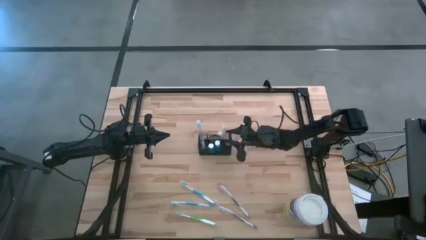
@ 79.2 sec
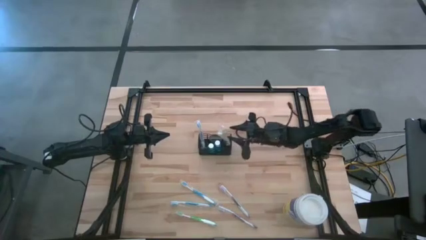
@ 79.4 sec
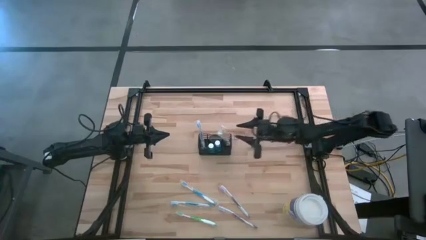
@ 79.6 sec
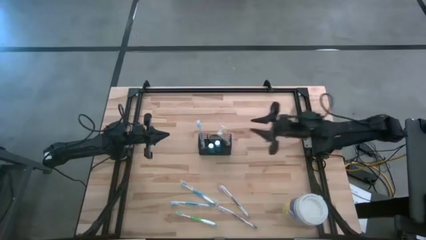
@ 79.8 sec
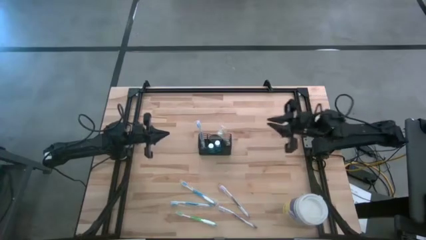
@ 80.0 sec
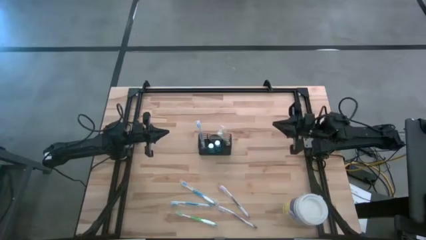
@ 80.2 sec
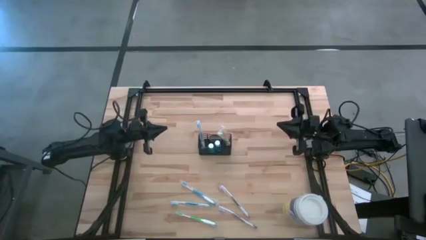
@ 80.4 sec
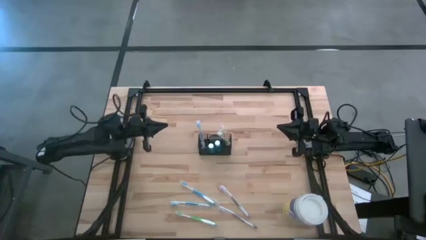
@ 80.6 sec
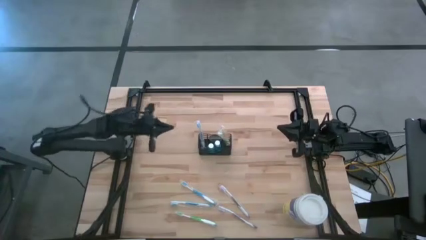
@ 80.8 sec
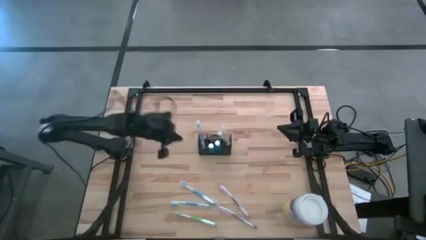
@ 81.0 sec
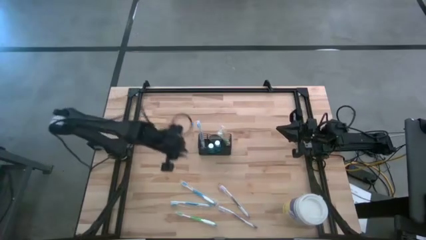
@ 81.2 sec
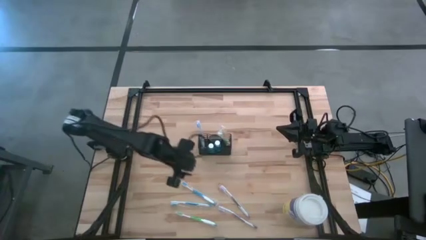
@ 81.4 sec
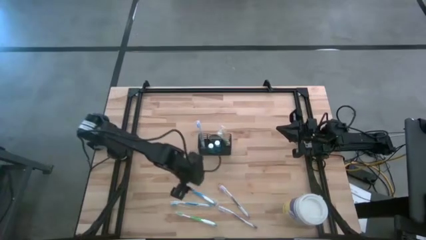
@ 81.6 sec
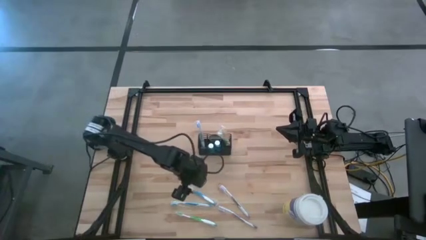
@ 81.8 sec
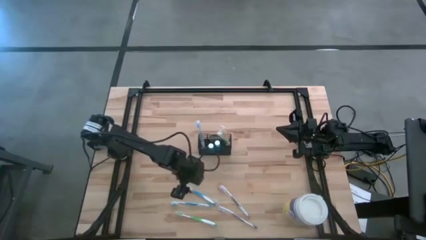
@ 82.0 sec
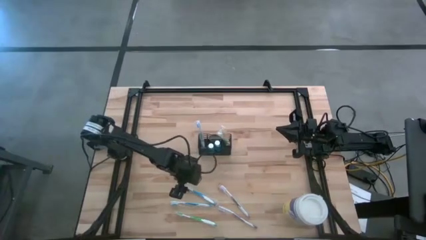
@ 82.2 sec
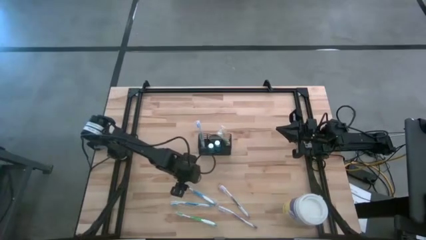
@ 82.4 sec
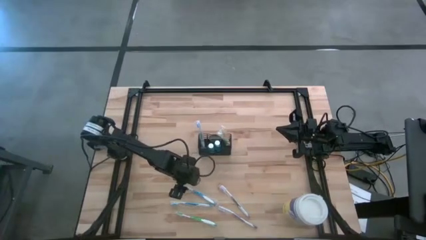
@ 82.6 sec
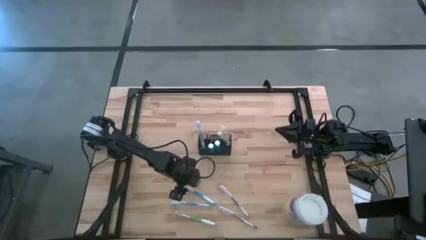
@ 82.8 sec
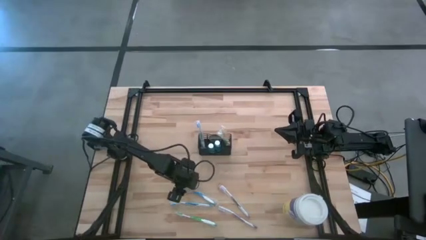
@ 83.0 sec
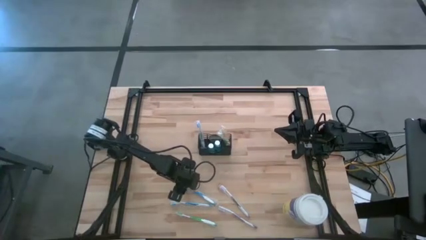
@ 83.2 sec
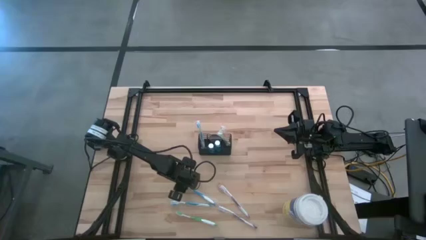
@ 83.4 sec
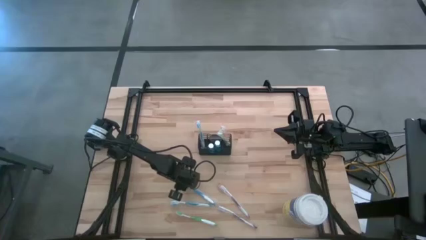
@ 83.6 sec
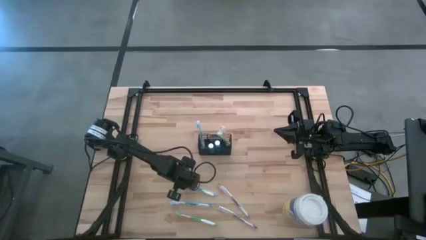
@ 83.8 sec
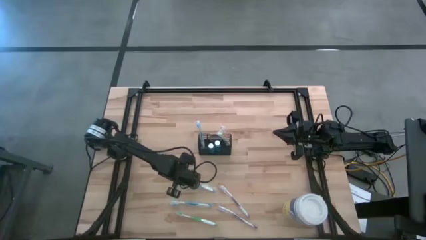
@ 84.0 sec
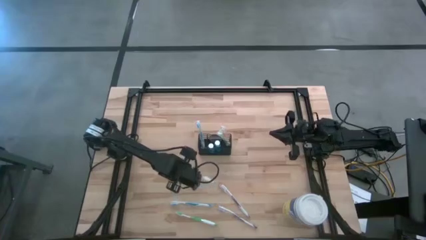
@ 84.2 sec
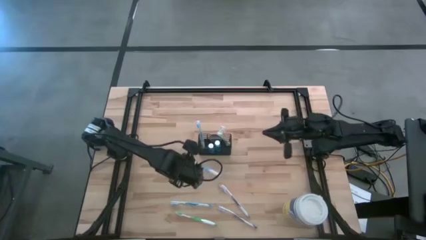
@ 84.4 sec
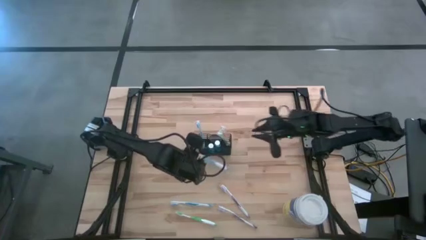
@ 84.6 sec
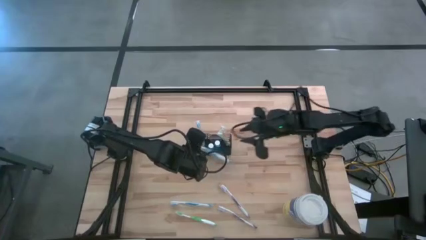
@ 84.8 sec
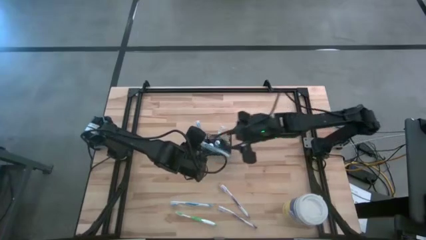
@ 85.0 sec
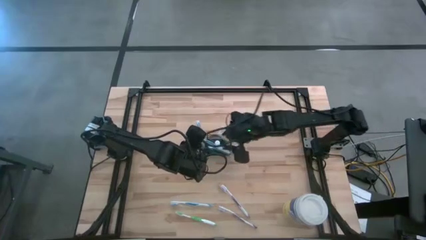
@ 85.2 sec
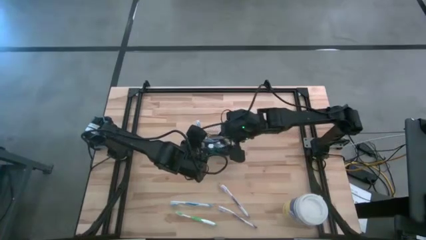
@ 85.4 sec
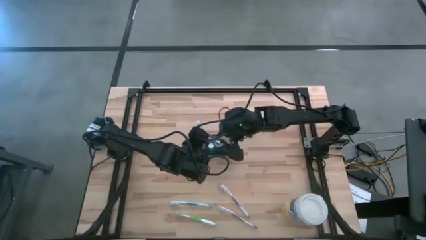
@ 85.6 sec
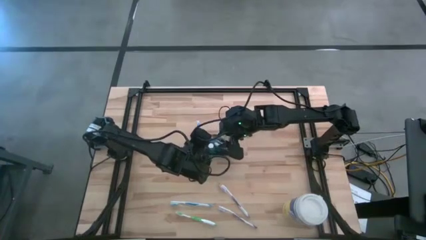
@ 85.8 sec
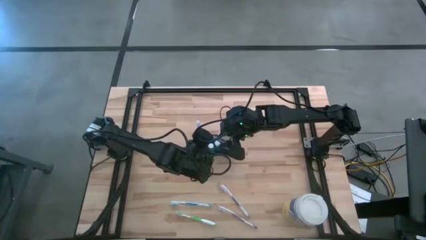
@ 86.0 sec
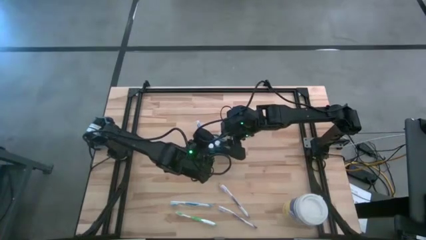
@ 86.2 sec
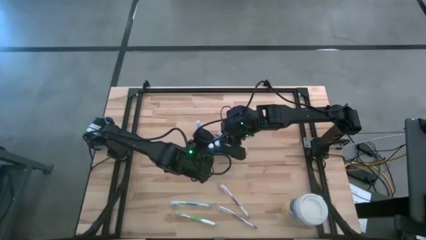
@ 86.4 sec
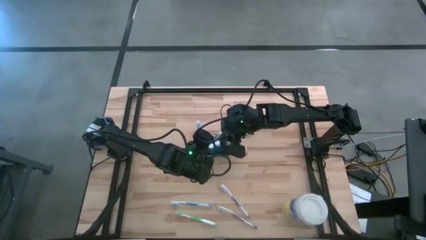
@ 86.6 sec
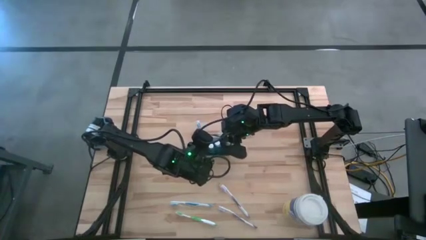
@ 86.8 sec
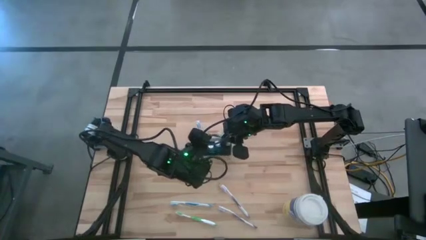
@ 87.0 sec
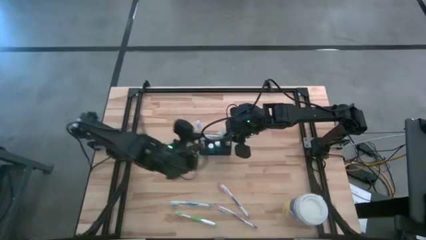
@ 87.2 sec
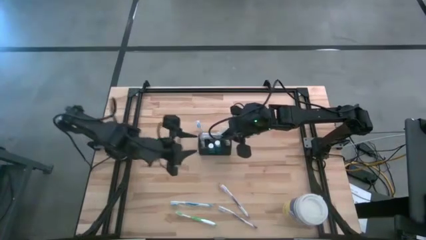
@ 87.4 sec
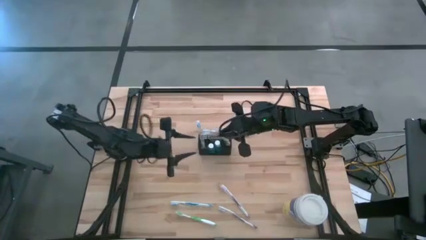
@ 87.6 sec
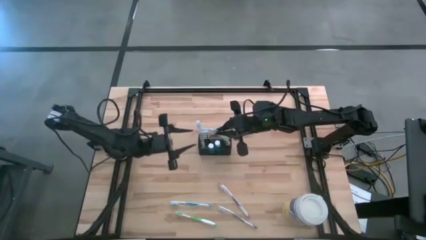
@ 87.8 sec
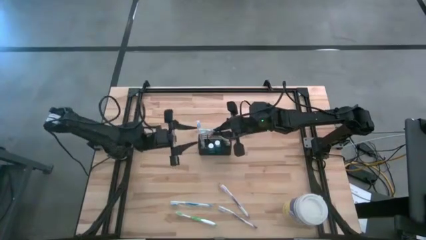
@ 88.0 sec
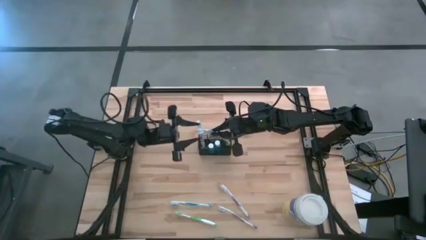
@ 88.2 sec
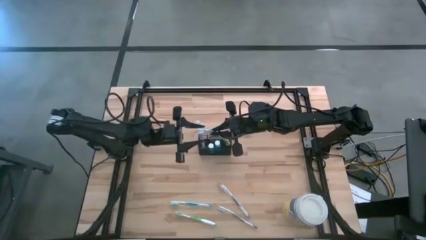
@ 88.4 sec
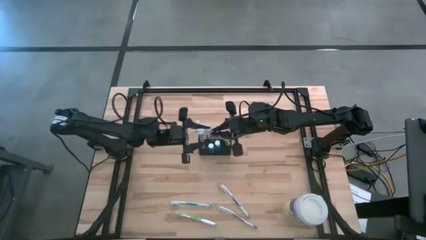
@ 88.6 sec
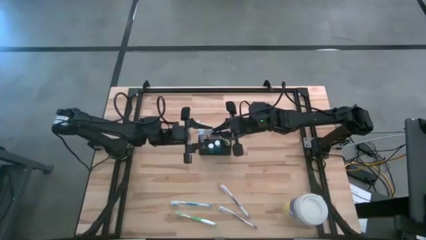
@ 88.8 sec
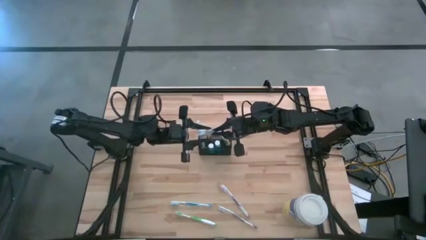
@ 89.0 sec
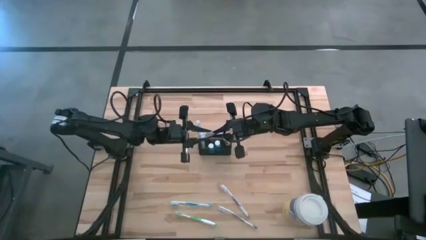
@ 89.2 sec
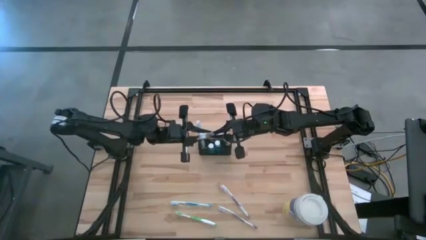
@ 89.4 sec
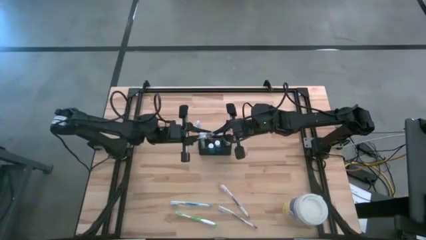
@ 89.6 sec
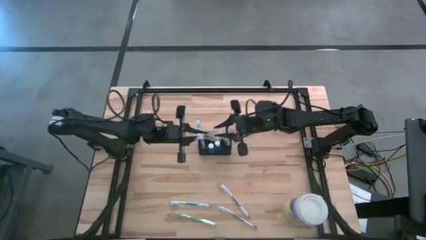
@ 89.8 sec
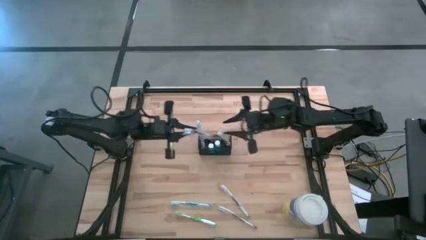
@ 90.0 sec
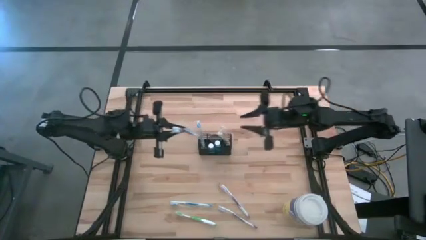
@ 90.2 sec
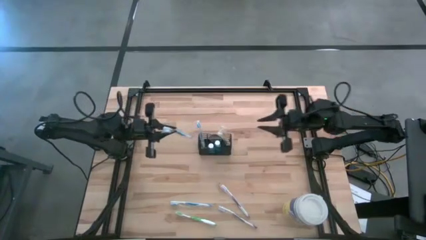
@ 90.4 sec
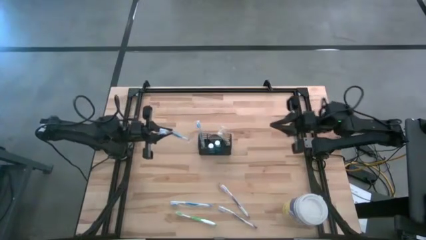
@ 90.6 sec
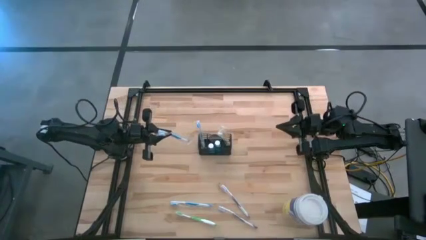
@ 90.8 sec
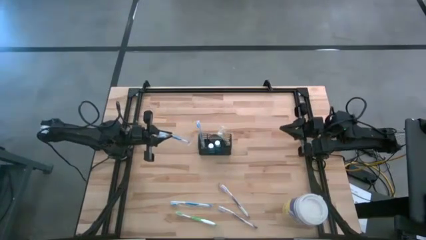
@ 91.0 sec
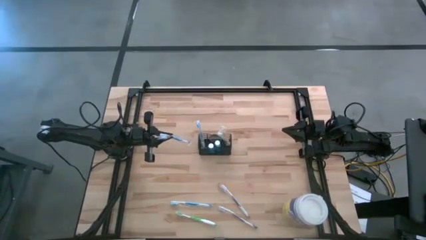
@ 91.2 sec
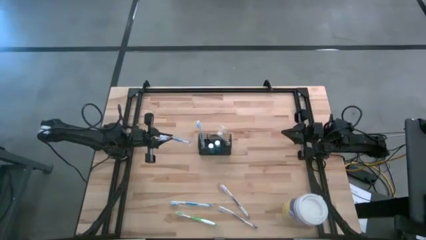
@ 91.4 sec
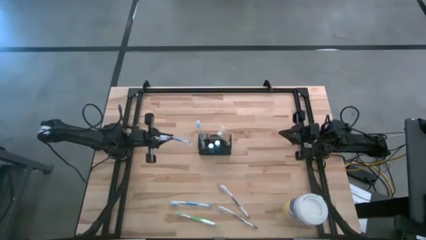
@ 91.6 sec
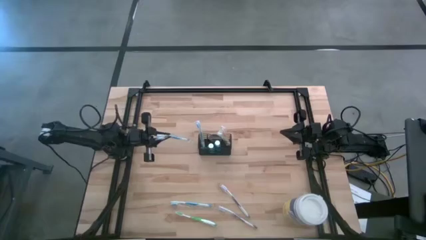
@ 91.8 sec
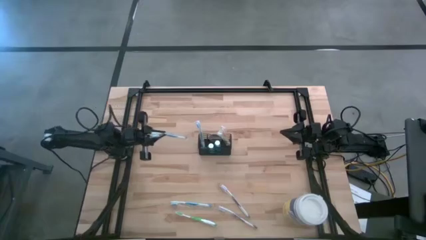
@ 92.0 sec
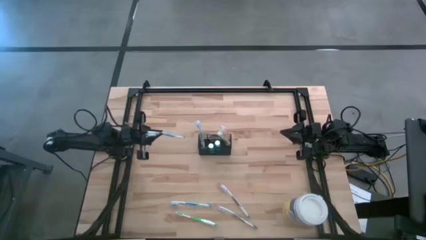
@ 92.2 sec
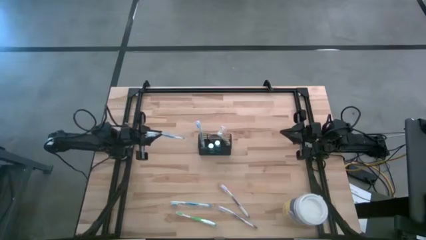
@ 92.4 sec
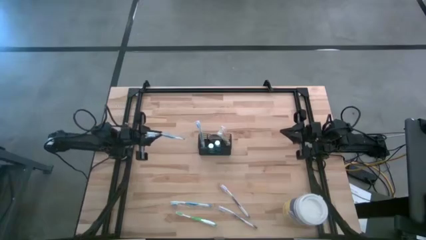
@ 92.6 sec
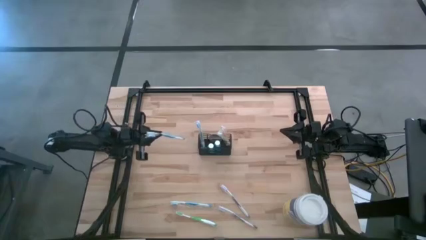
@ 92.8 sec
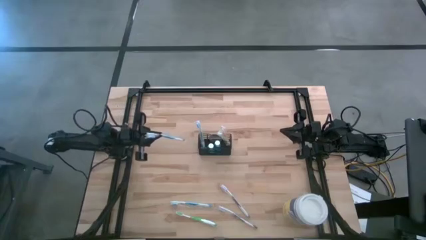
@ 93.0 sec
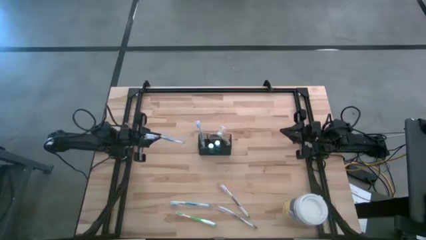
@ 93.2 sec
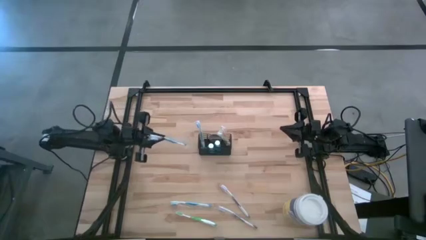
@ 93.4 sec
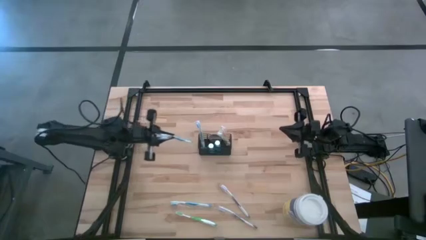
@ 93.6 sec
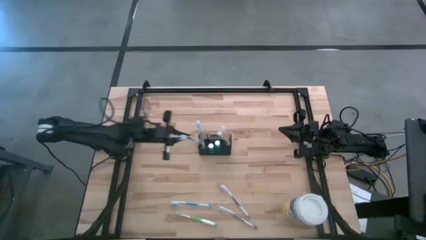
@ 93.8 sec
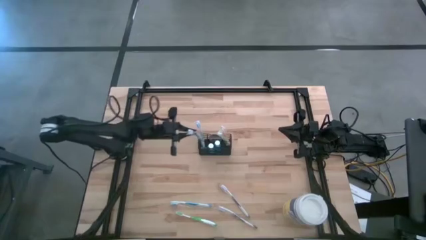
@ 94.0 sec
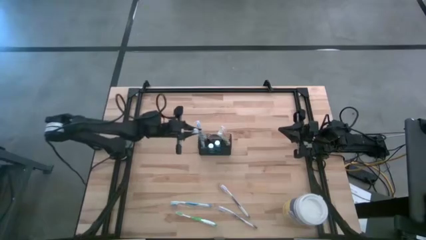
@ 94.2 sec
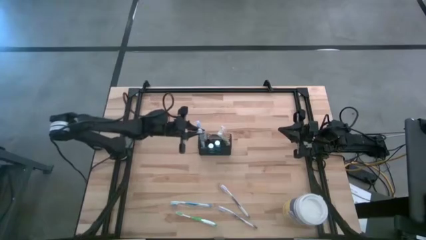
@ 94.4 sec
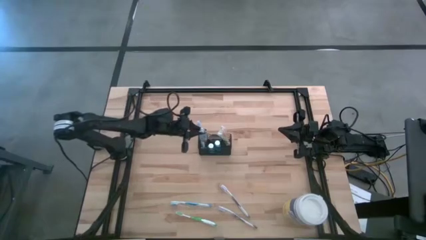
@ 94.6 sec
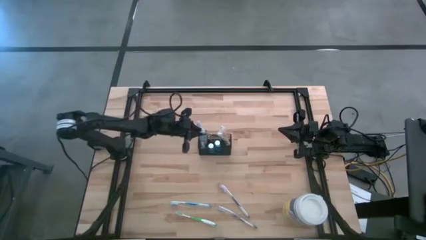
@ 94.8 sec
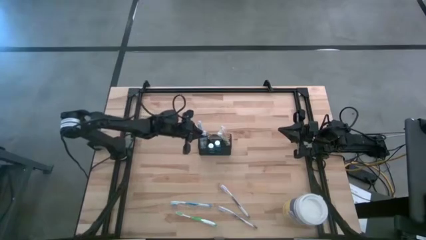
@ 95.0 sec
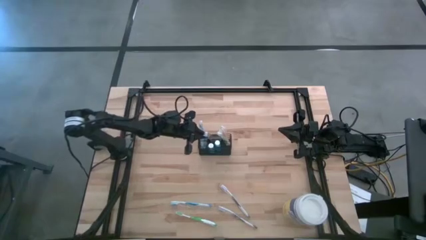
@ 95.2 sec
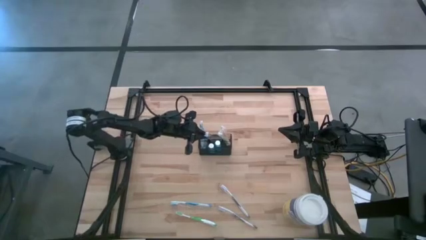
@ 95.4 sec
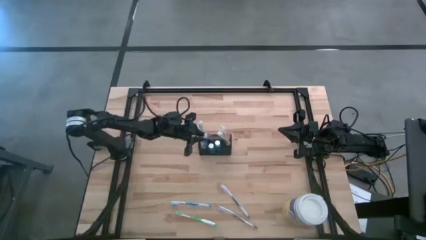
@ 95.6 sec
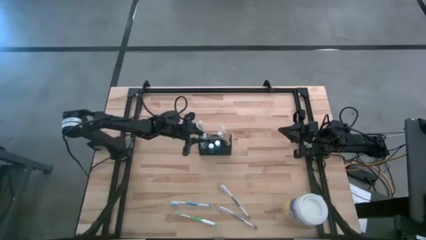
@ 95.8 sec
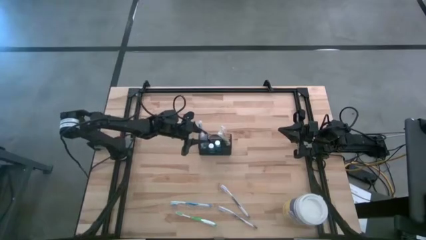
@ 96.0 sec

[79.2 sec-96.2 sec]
Task: Pick & Place toothbrushing station
Put the right blue toothbrush into the black mesh organizer
